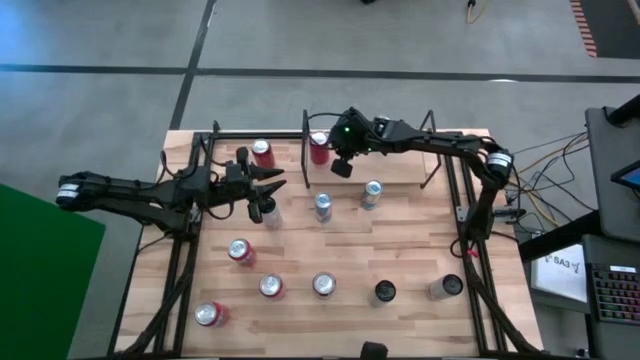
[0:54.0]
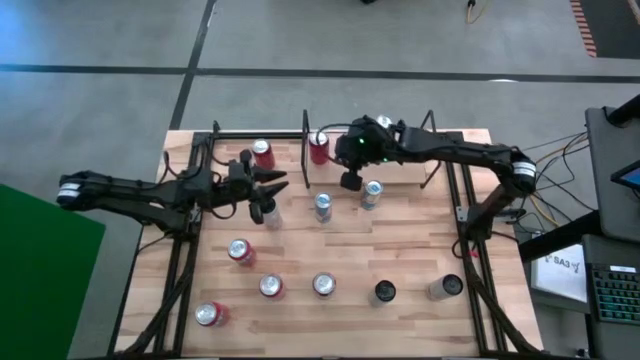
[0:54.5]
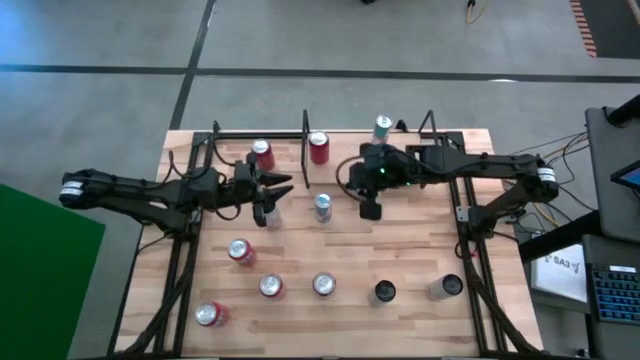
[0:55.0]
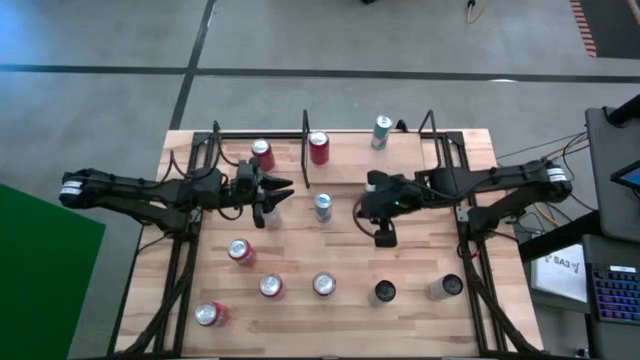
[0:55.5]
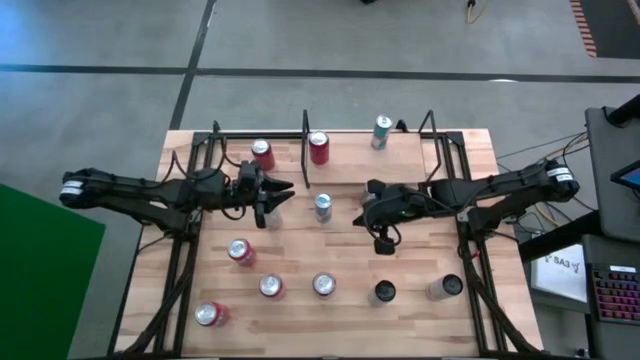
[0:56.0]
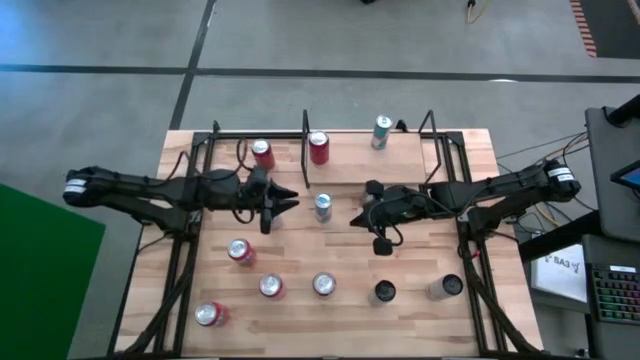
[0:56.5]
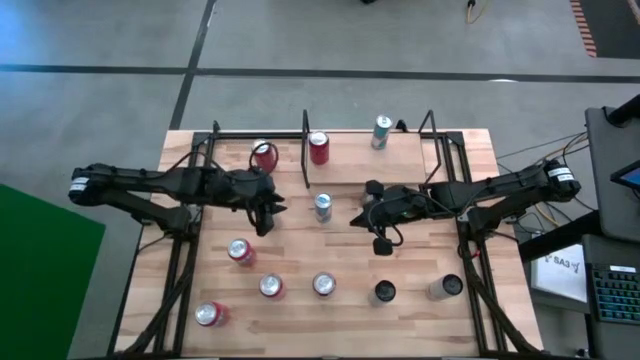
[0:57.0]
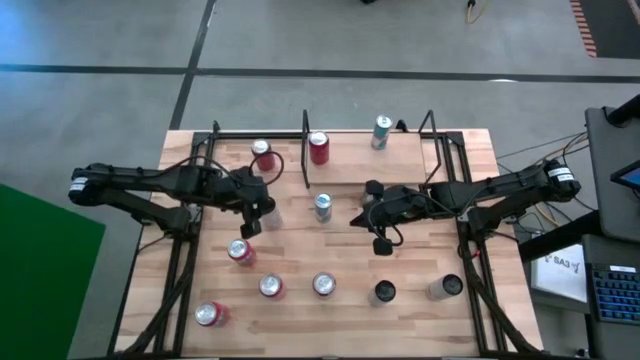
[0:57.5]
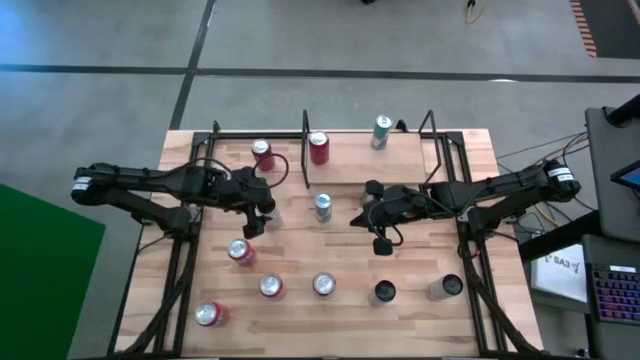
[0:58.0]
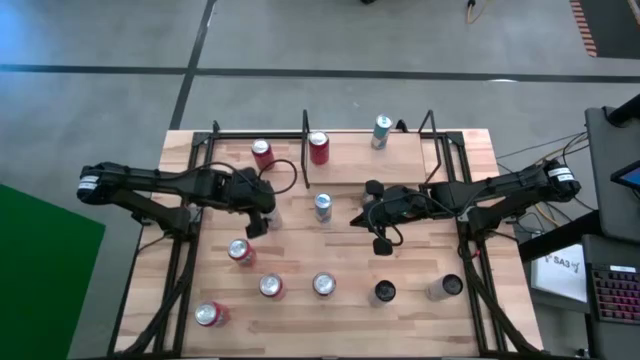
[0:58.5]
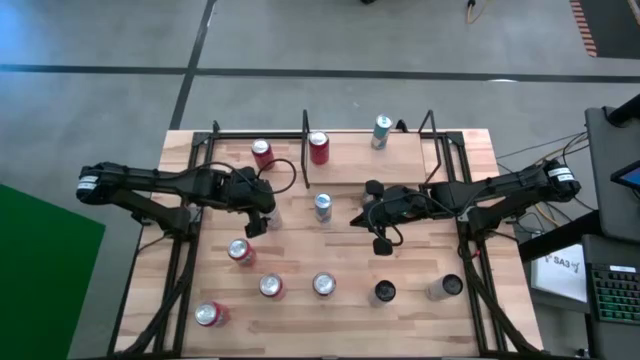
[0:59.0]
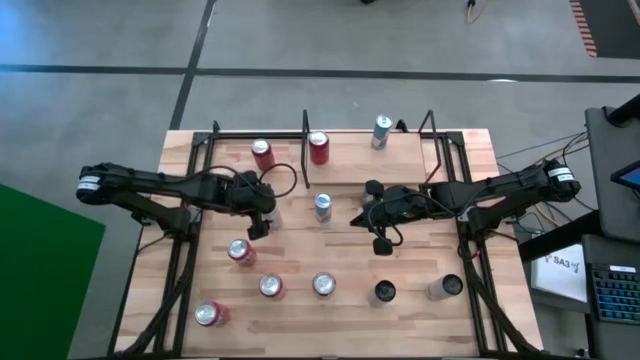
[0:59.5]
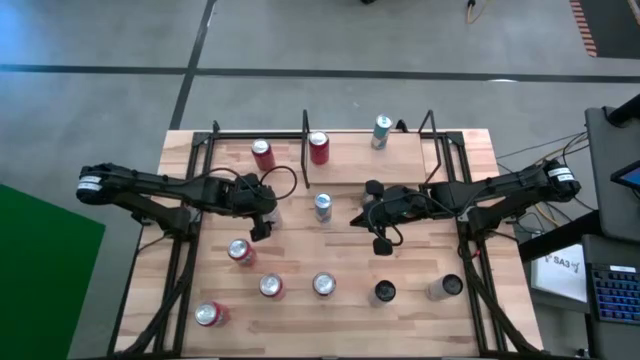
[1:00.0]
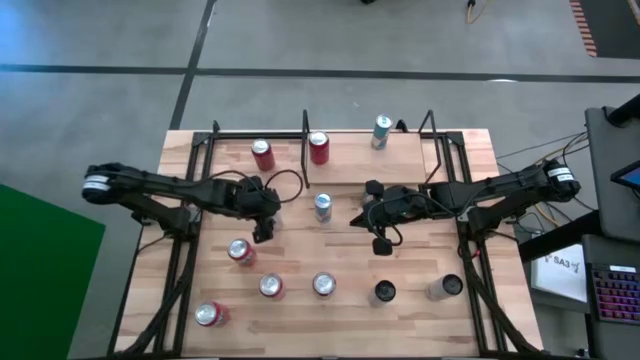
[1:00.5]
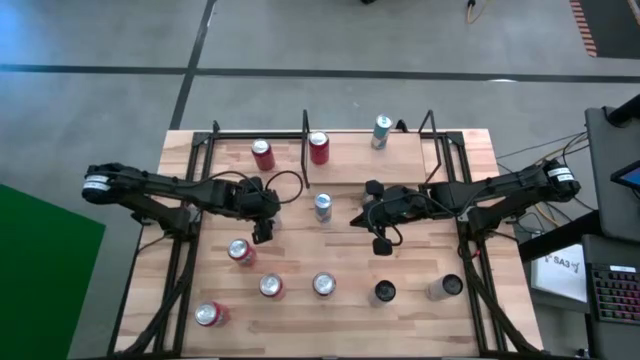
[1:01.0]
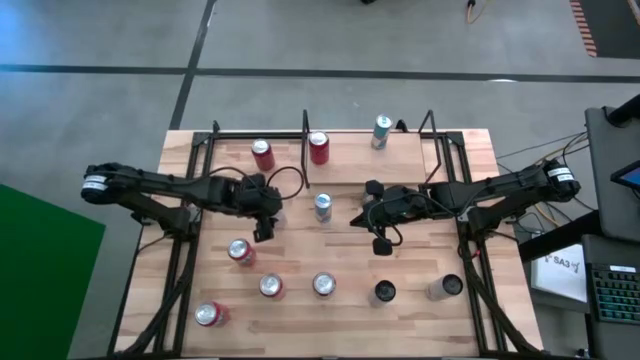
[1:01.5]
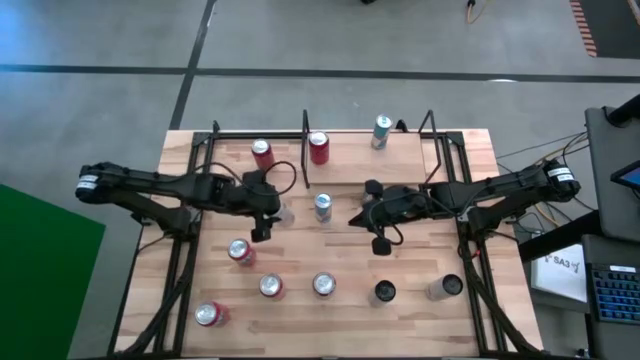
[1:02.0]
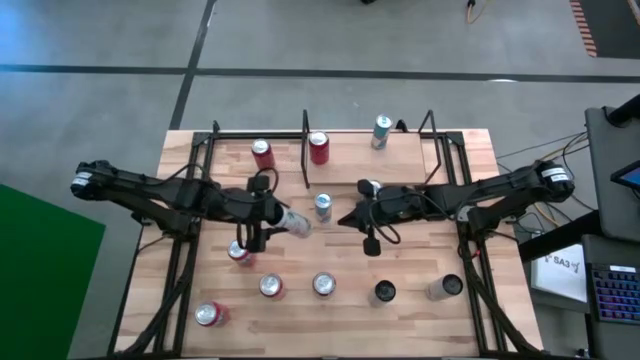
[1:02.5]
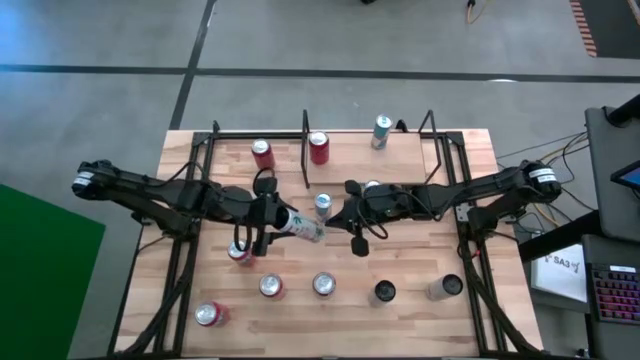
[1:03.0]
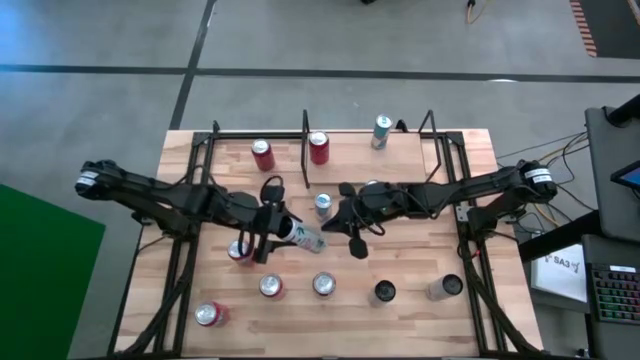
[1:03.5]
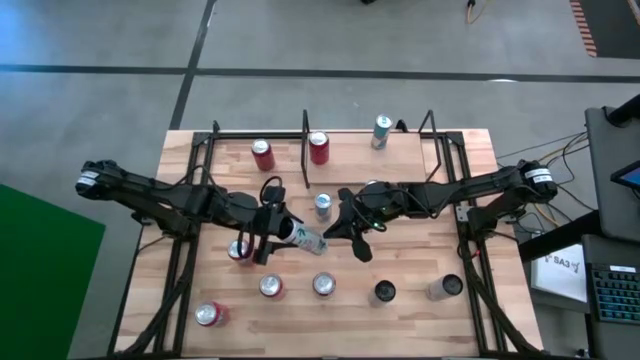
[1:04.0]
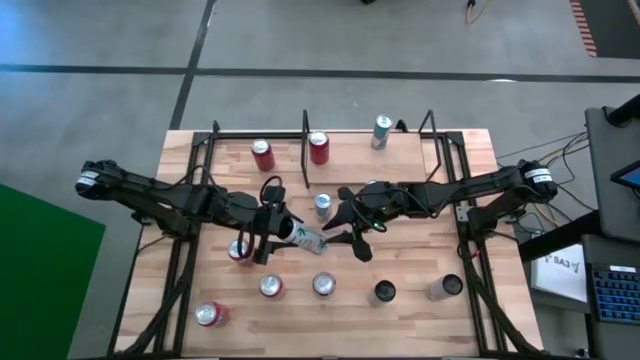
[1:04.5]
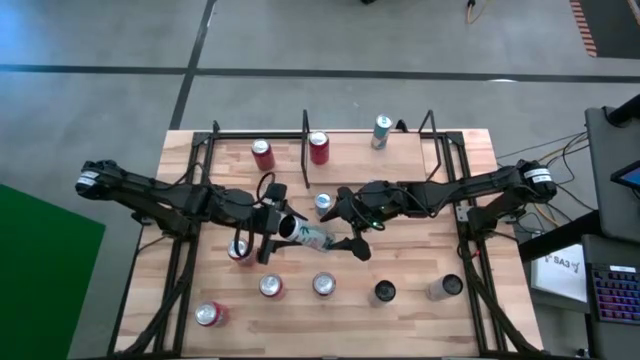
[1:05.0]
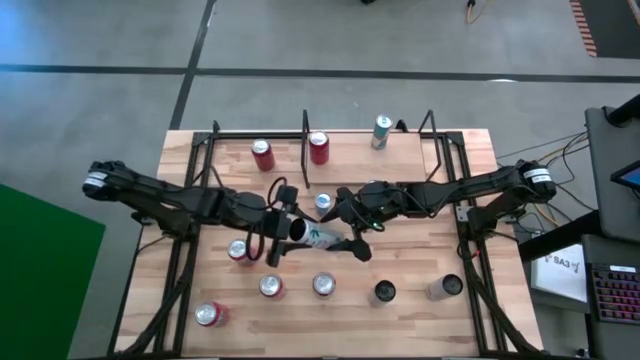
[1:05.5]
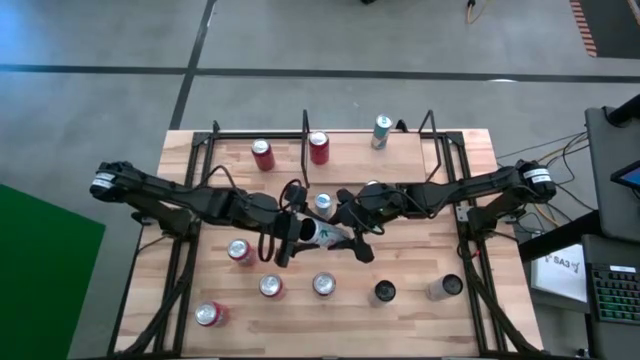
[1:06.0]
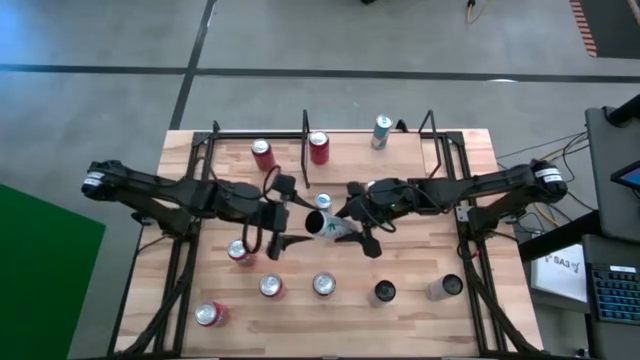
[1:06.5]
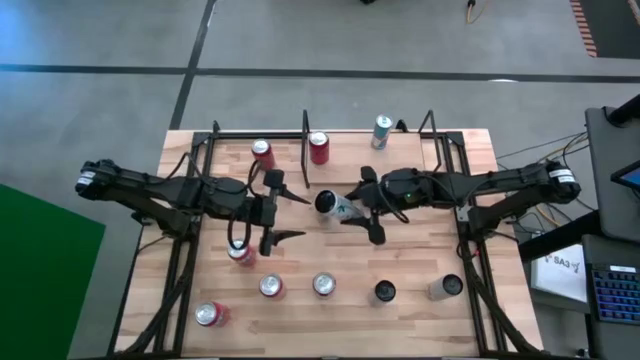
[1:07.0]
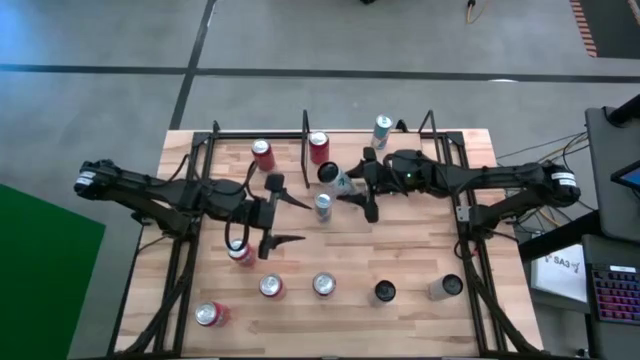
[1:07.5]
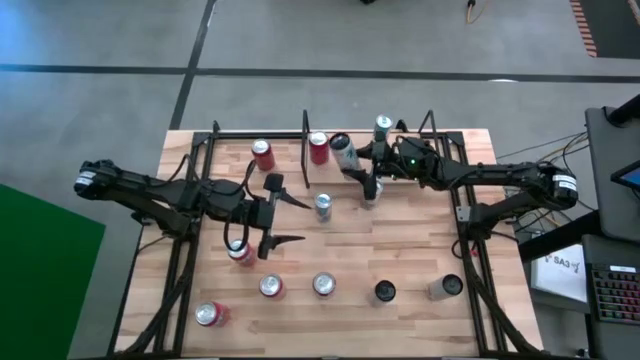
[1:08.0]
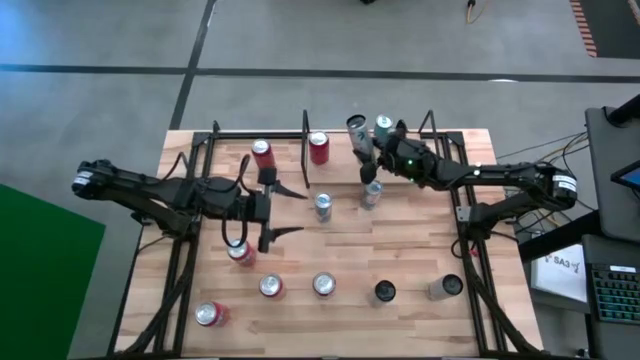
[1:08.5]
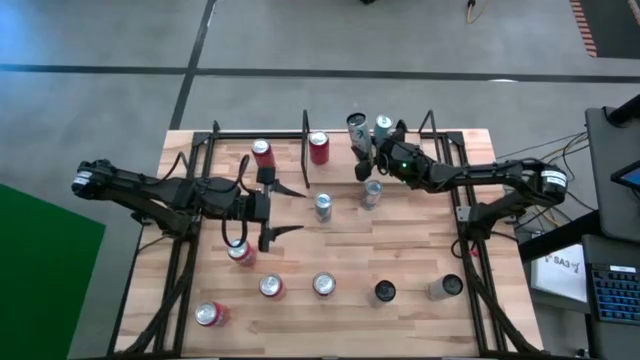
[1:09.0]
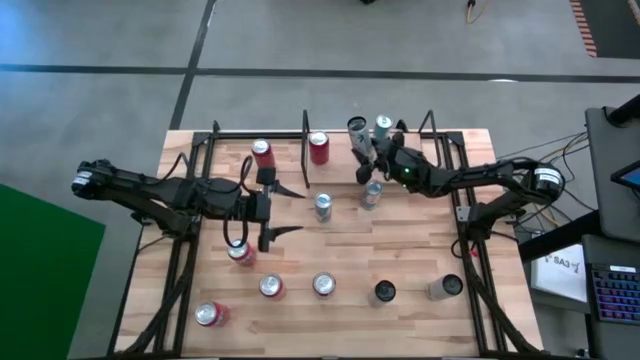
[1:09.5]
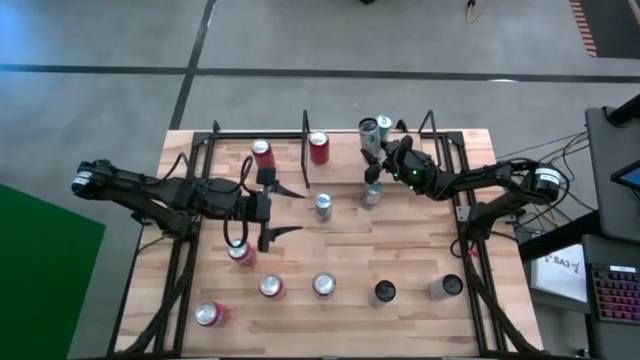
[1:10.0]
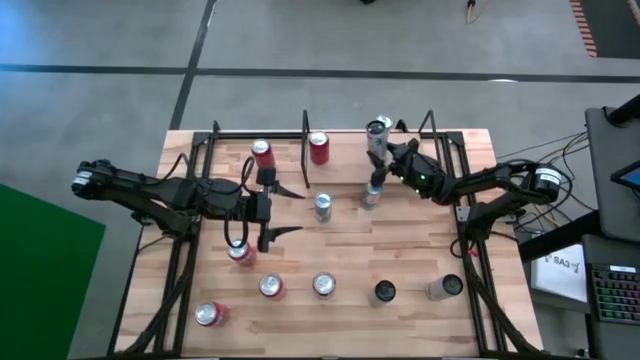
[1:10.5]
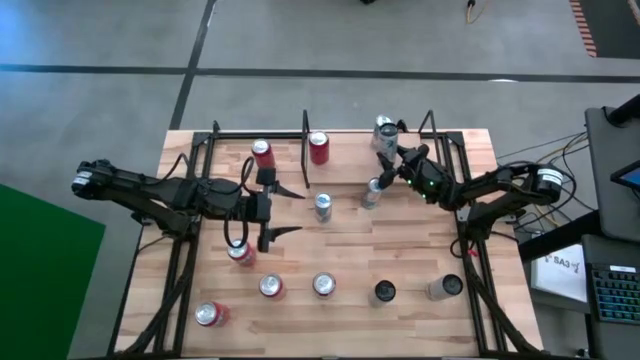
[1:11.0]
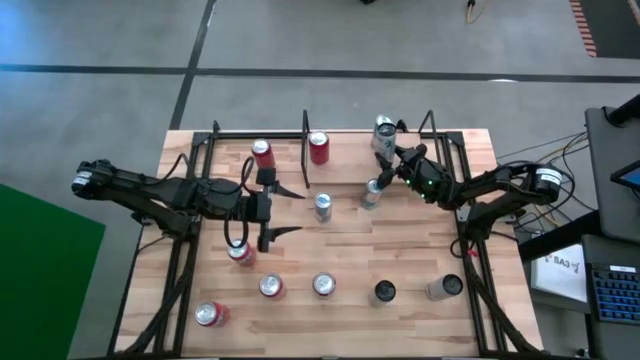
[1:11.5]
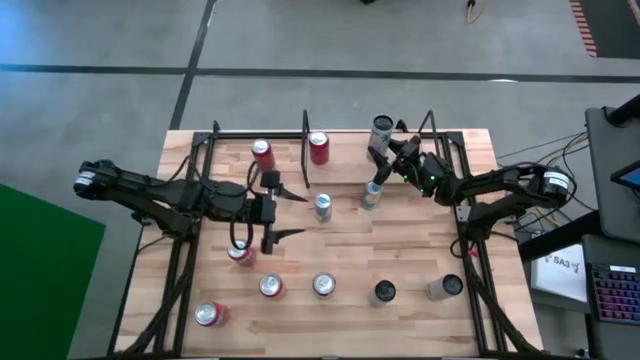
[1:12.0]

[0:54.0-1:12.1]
Task: Place canned beverage on shelf
Put the white and pink soda can on the shelf

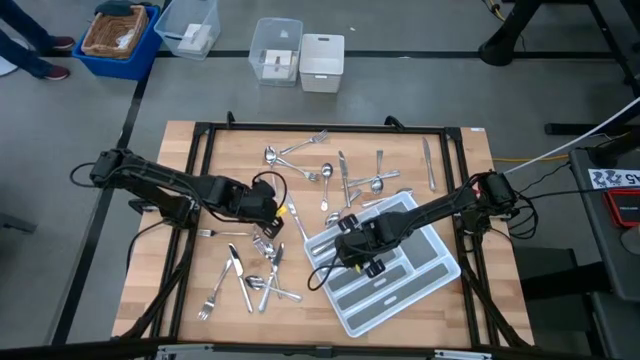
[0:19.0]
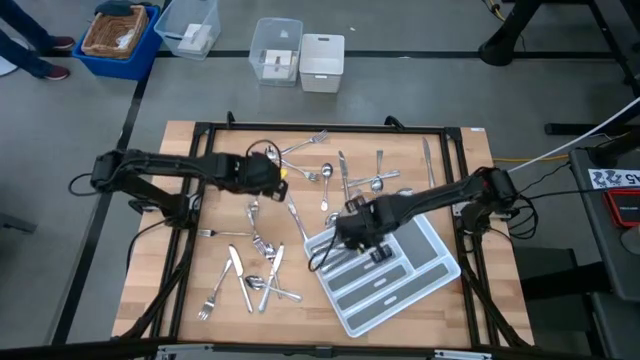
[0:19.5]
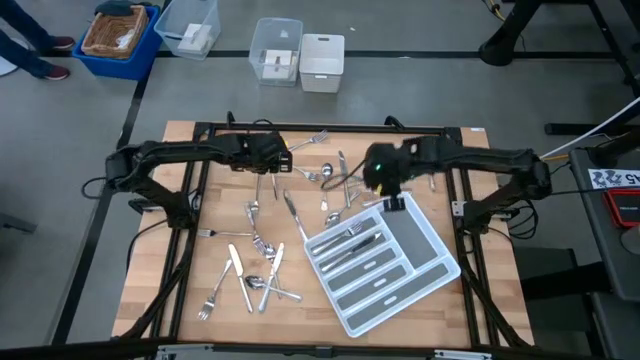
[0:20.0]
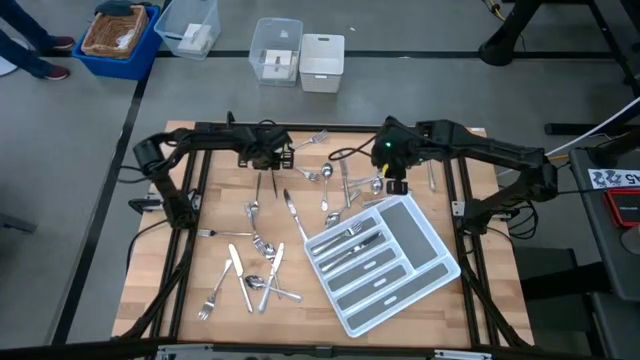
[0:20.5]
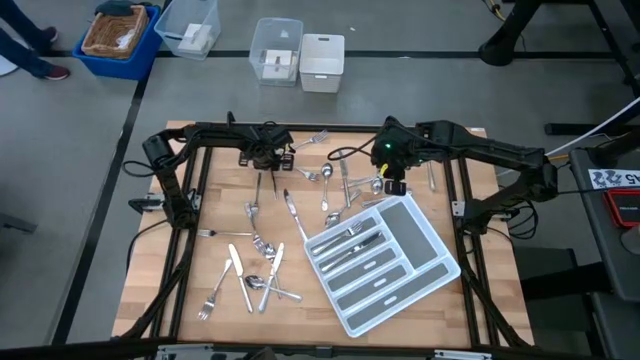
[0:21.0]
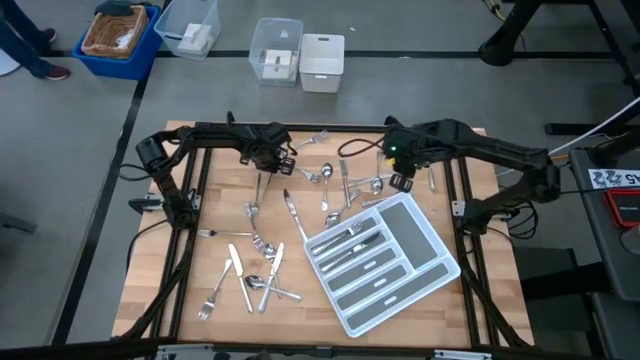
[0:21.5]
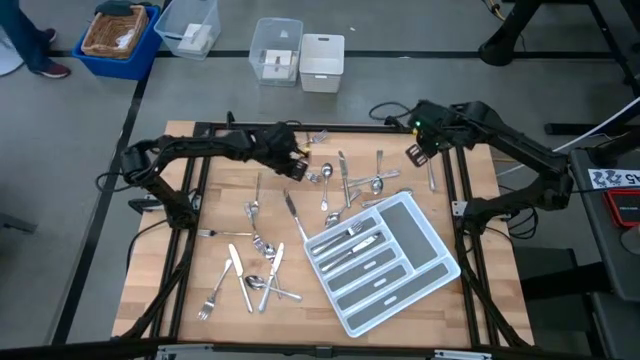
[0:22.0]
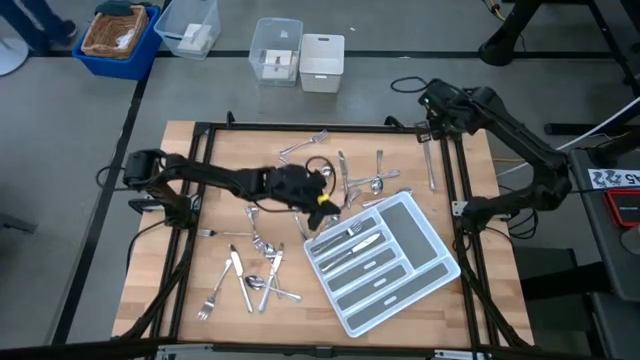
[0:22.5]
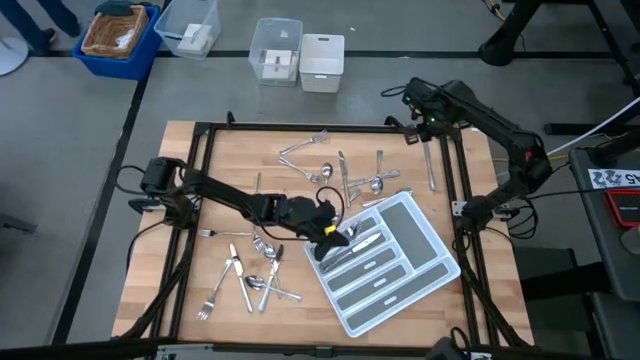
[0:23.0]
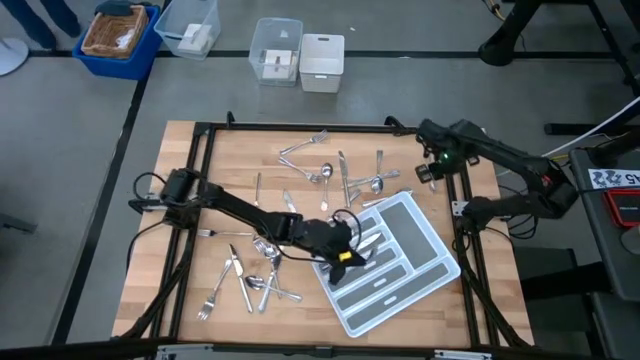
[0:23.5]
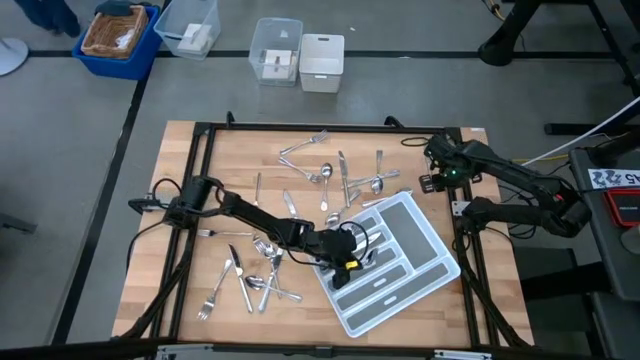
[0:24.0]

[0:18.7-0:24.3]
Task: Sort silverware
Put the silver spoon into the silverware tray
